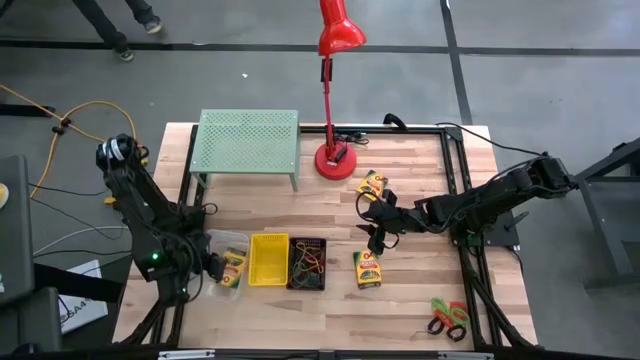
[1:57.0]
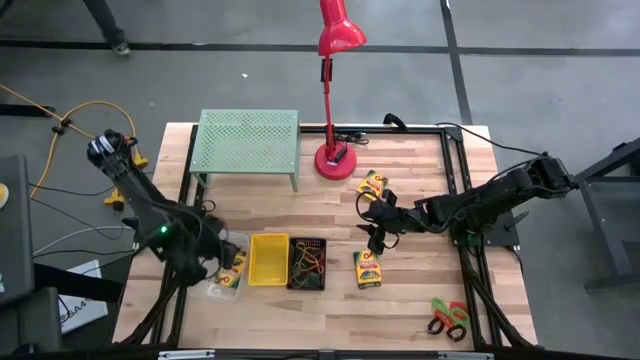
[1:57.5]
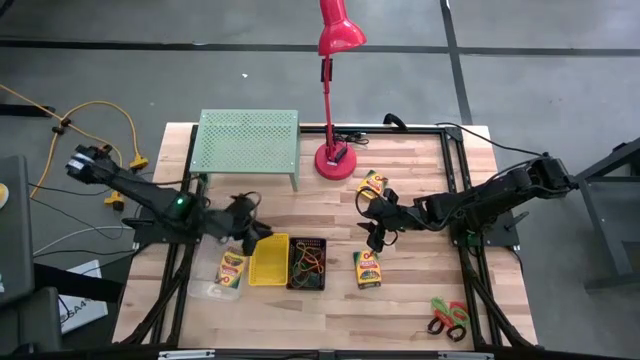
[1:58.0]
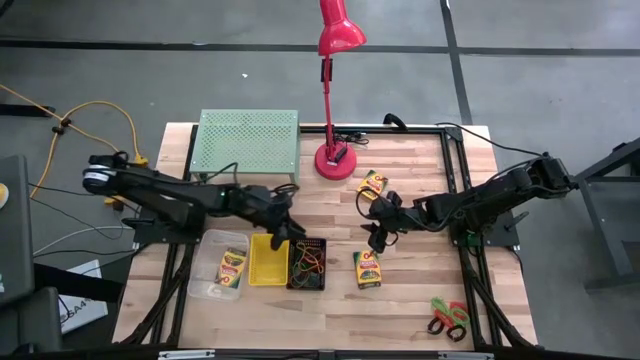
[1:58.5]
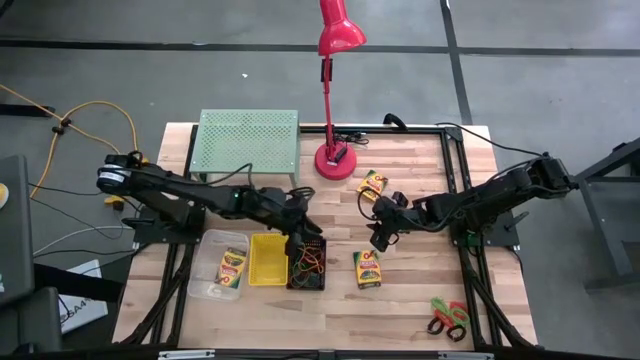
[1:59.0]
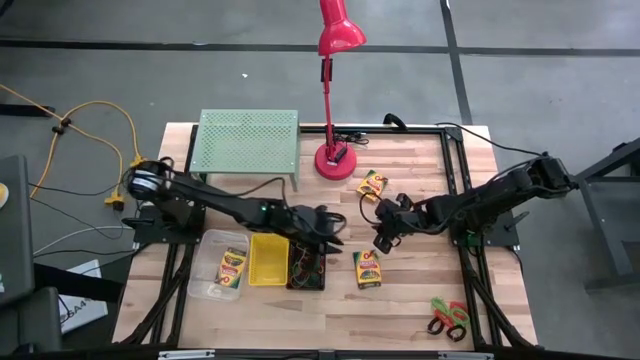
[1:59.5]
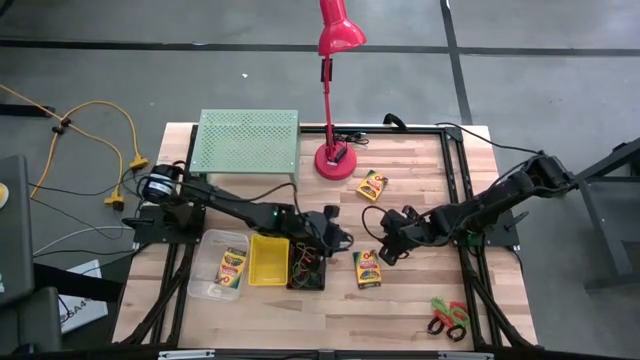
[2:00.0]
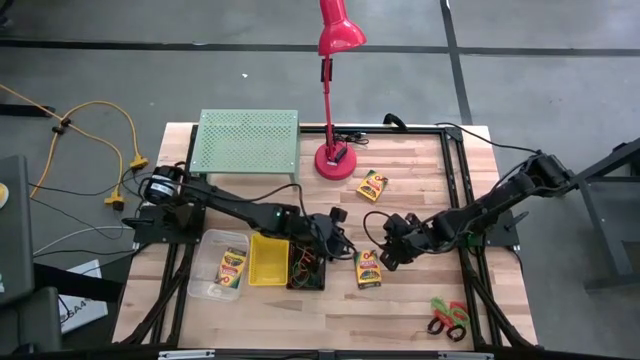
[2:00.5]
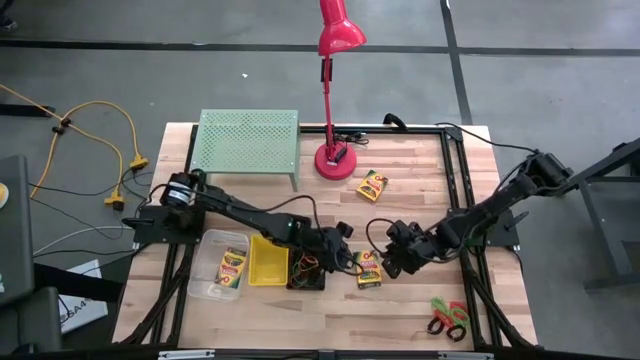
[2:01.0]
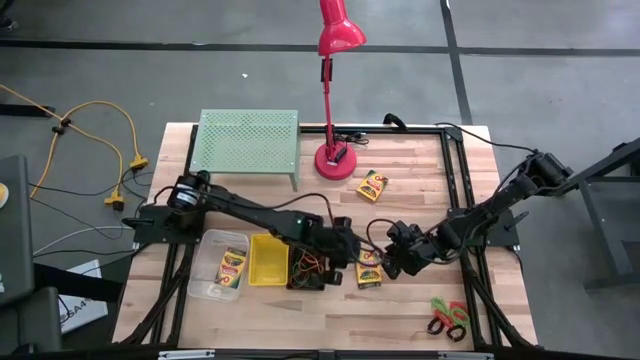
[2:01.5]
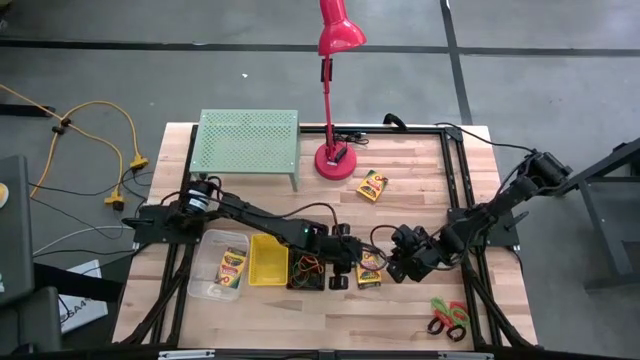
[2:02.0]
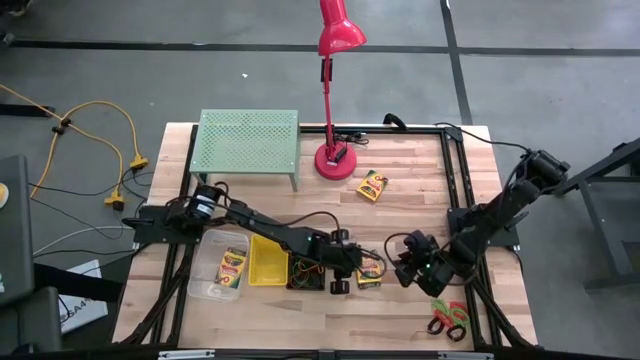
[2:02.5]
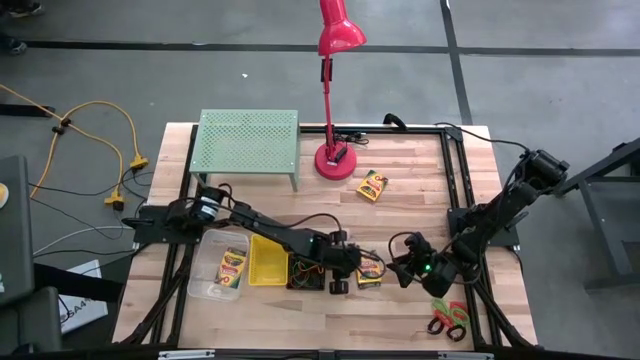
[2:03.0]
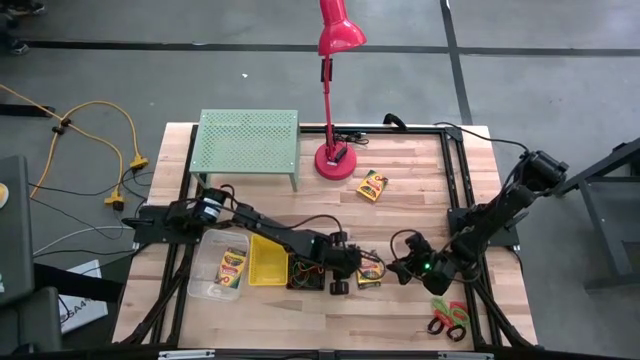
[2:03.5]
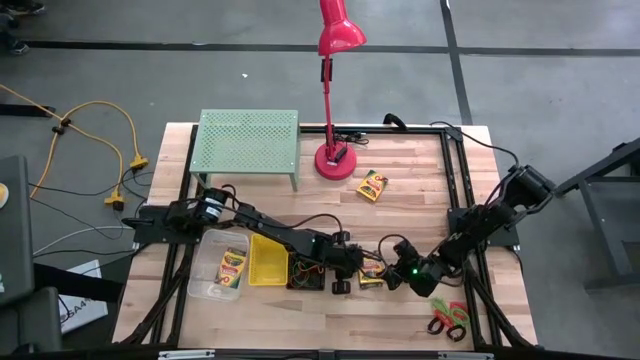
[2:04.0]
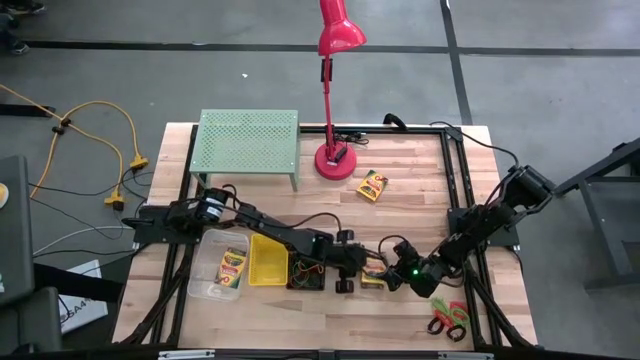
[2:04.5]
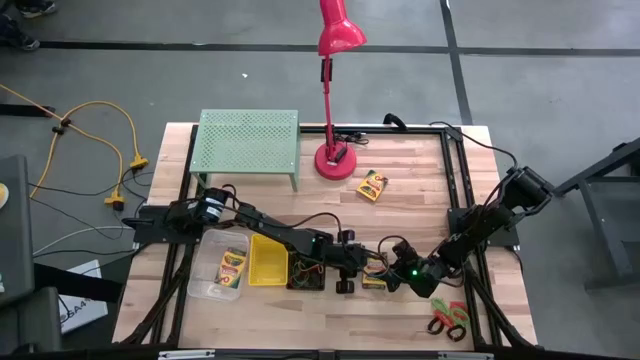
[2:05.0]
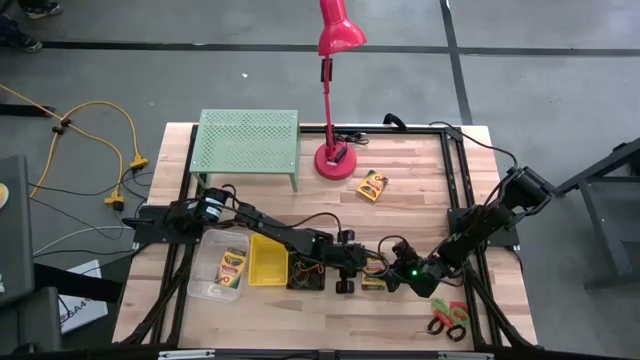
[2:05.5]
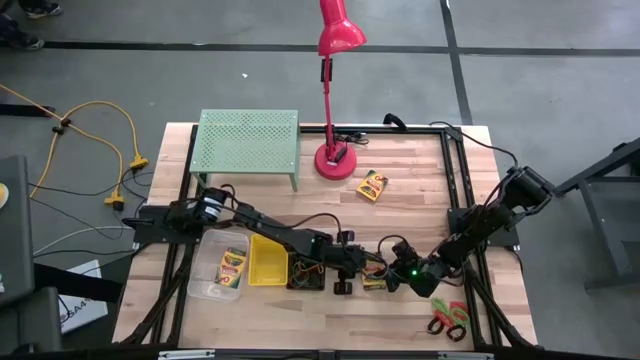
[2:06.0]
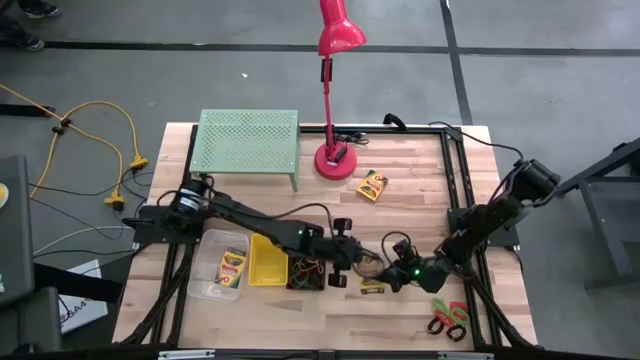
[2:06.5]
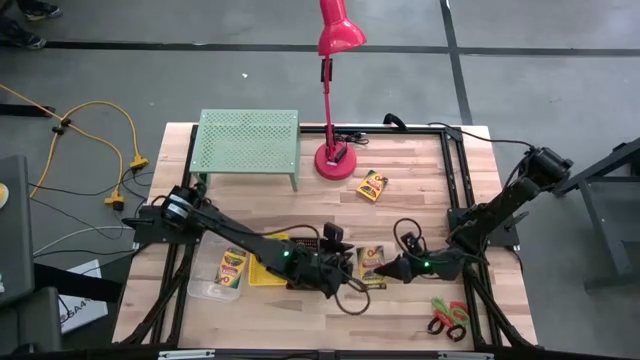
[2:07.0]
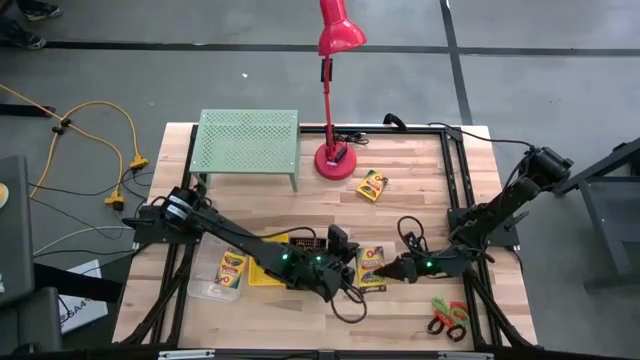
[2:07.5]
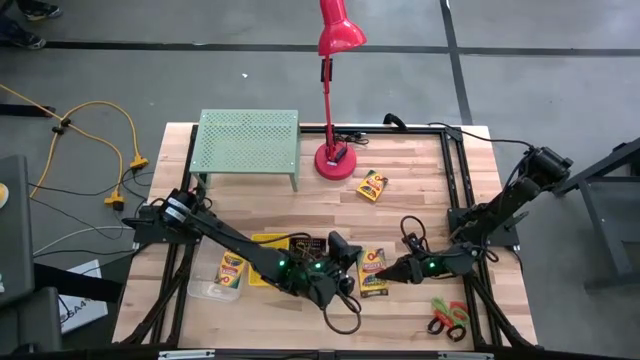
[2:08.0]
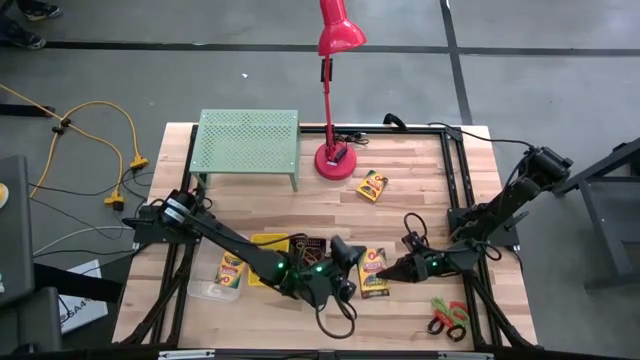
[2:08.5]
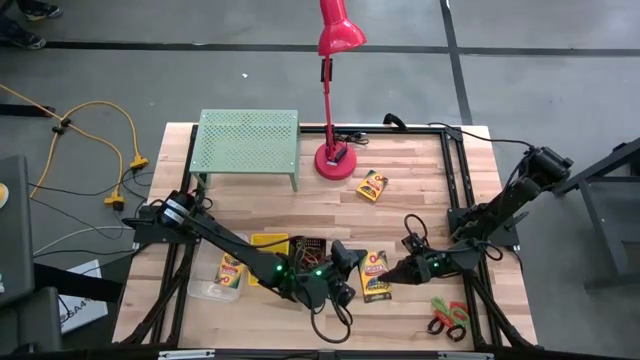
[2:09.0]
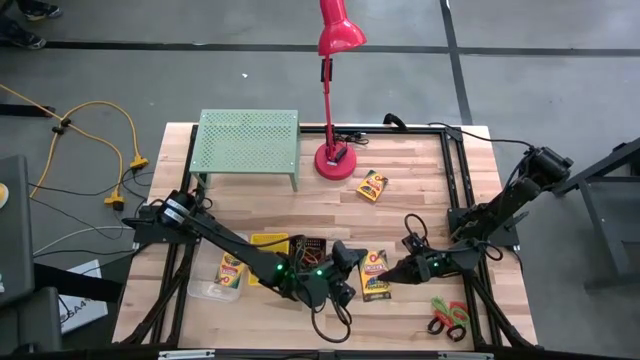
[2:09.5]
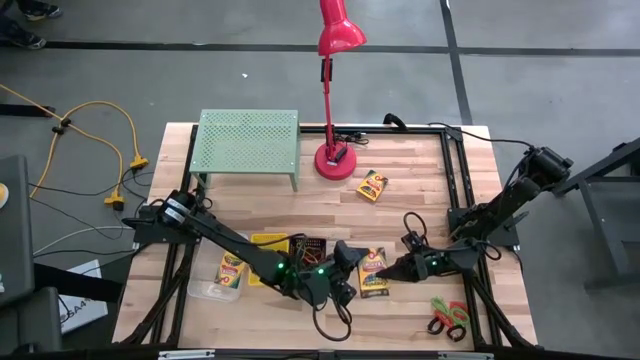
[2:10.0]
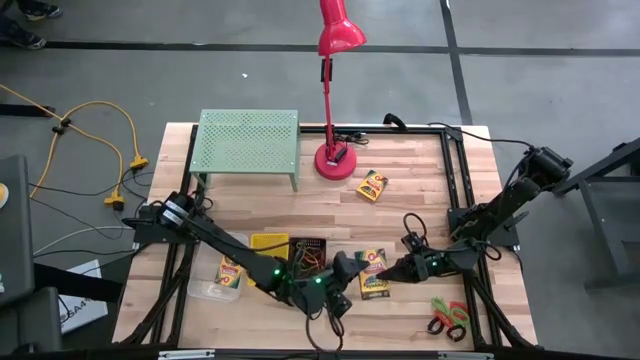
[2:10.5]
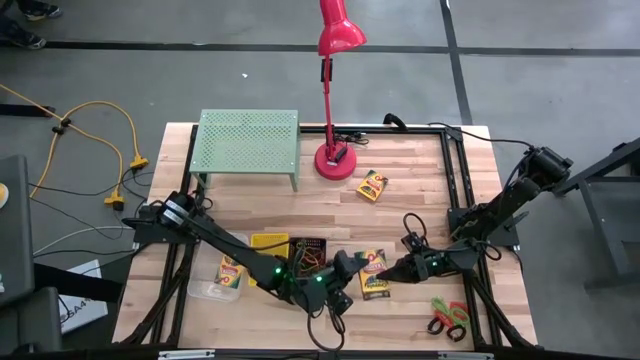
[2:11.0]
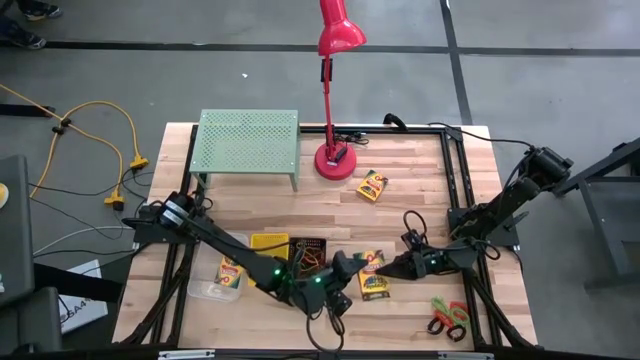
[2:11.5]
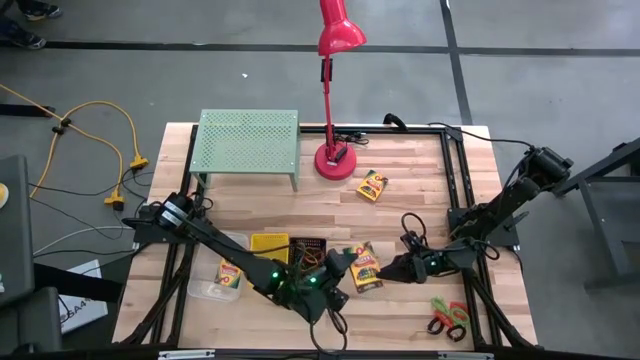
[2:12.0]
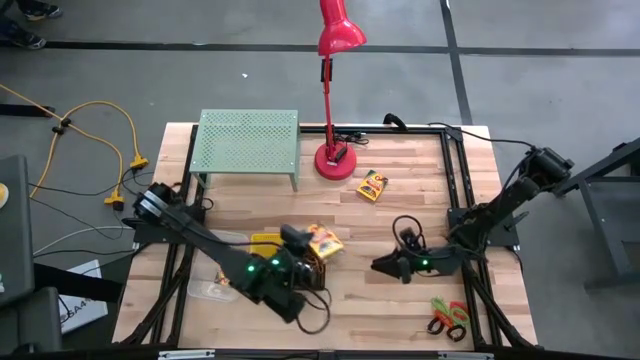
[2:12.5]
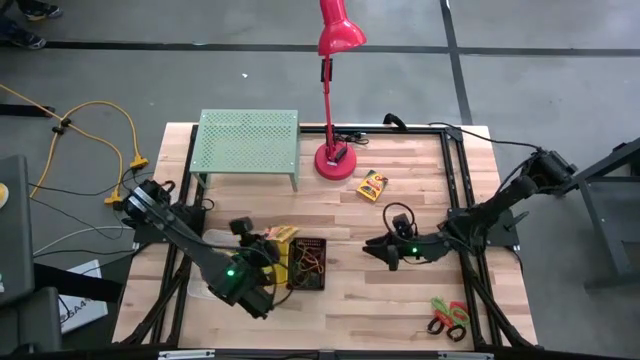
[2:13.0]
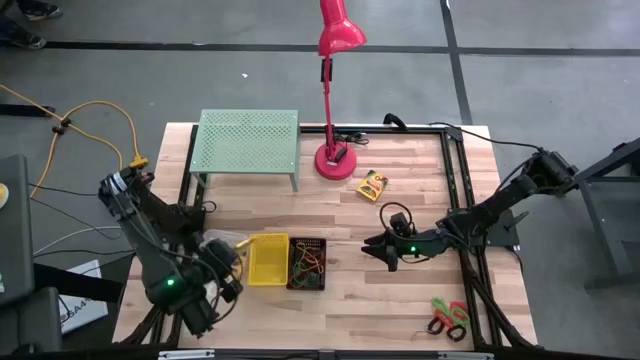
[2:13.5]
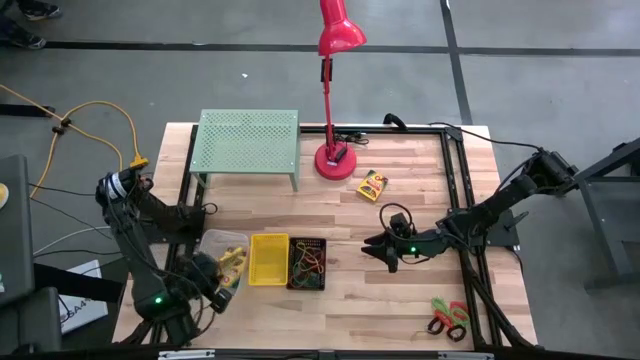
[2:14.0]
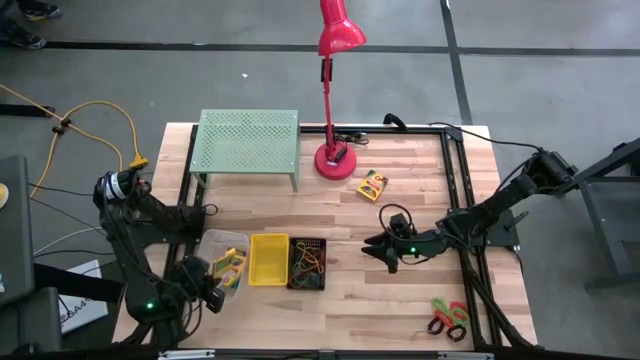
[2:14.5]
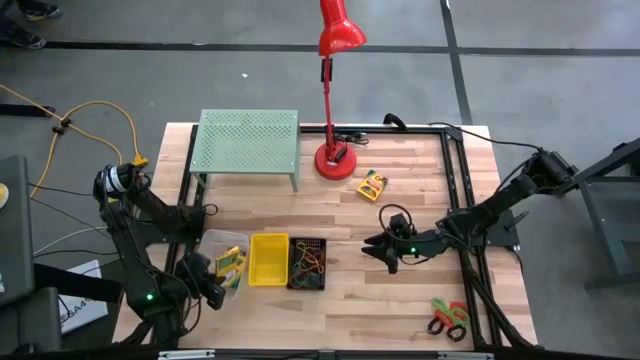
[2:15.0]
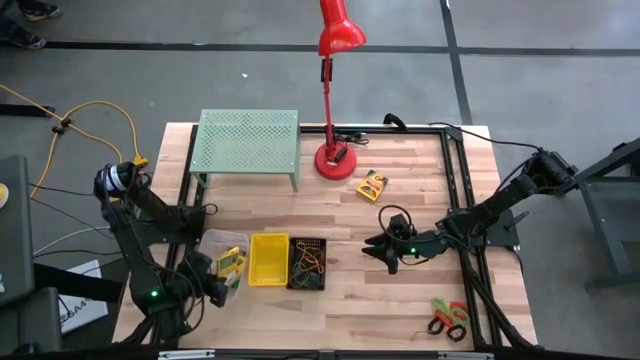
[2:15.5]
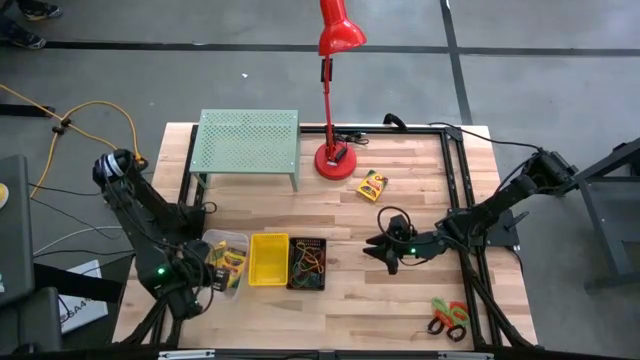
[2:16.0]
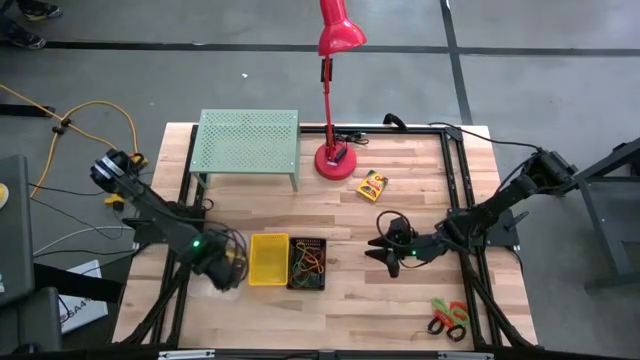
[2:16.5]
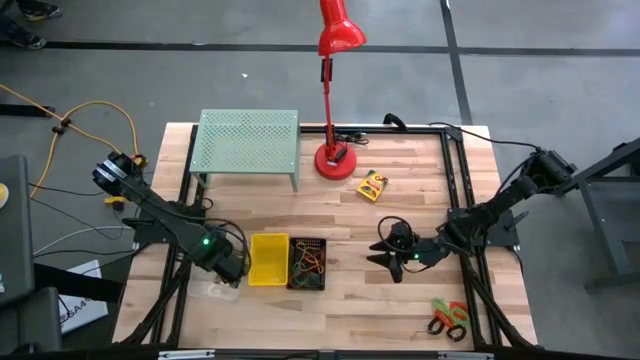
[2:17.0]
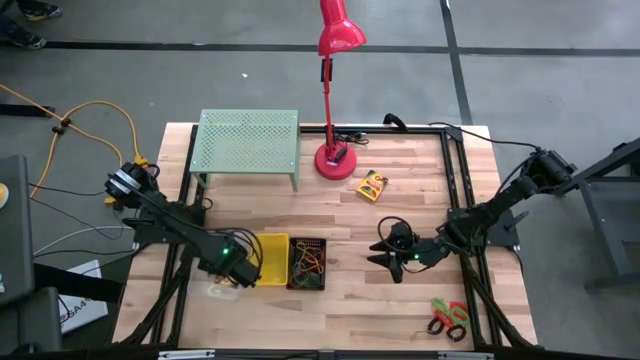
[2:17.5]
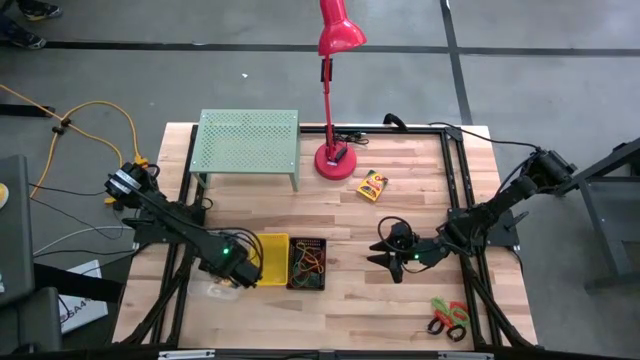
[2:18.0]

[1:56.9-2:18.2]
Task: Pick & Place Office Desk Supplies
Put the crayon box into the transparent bin
